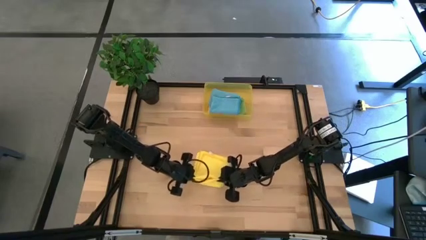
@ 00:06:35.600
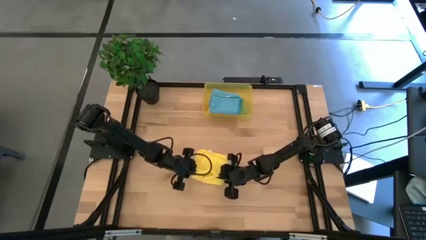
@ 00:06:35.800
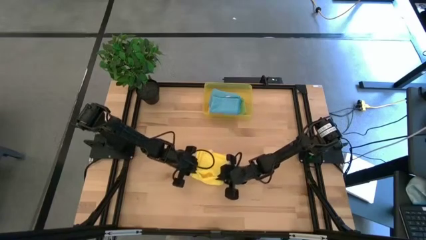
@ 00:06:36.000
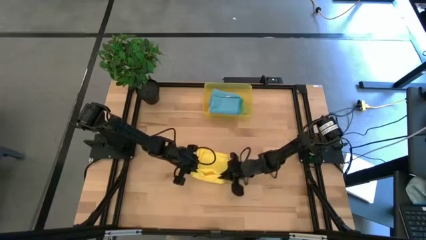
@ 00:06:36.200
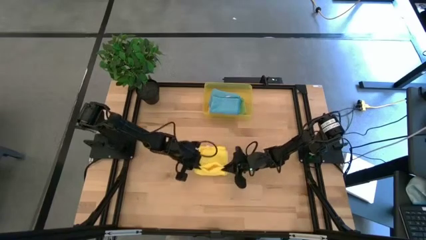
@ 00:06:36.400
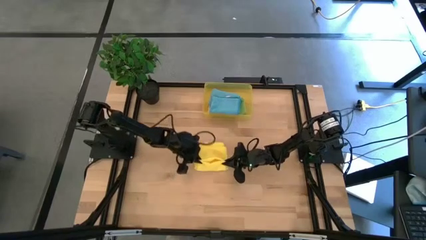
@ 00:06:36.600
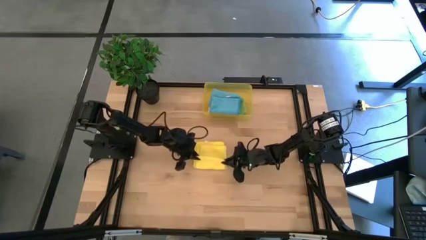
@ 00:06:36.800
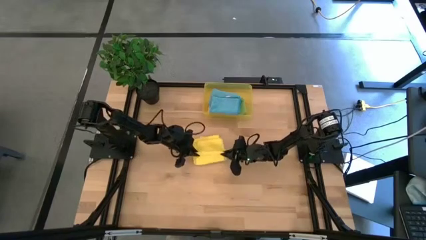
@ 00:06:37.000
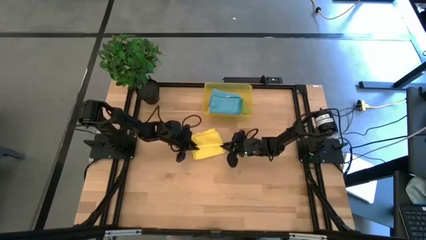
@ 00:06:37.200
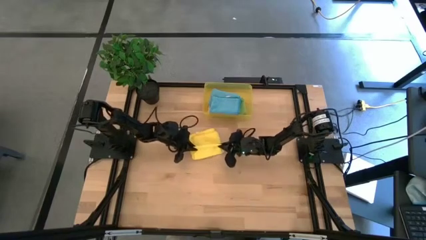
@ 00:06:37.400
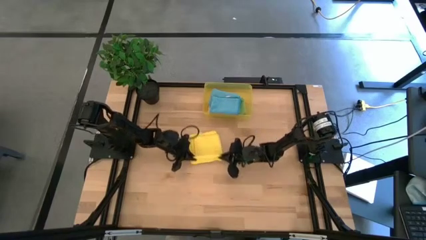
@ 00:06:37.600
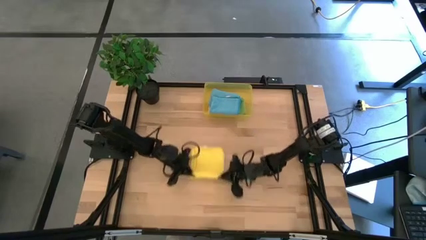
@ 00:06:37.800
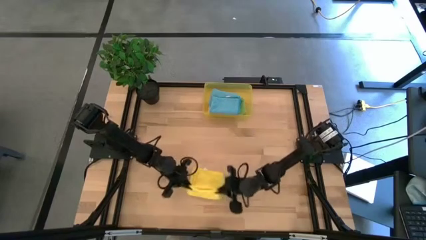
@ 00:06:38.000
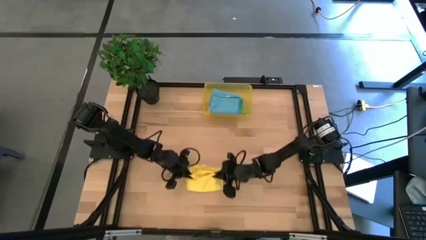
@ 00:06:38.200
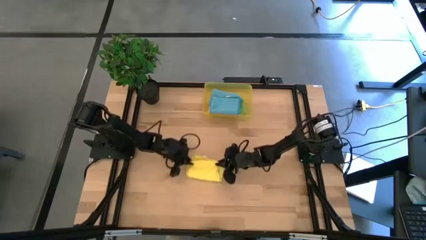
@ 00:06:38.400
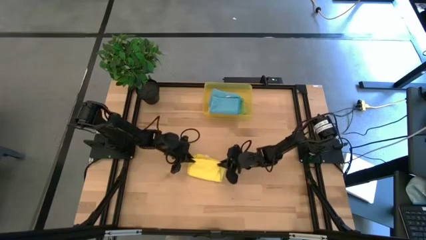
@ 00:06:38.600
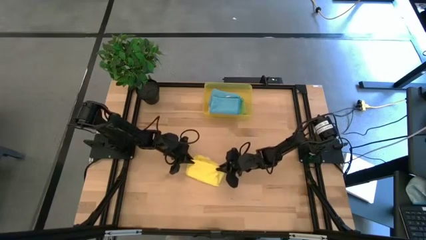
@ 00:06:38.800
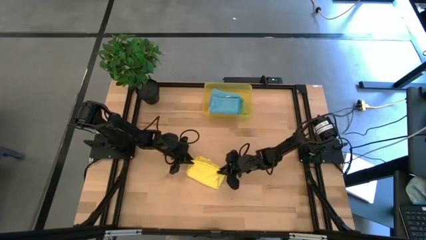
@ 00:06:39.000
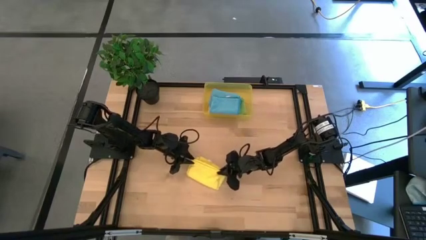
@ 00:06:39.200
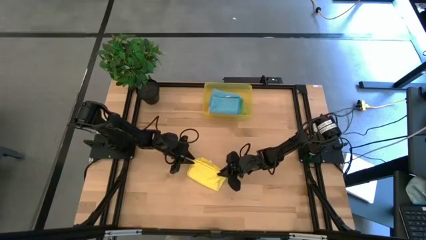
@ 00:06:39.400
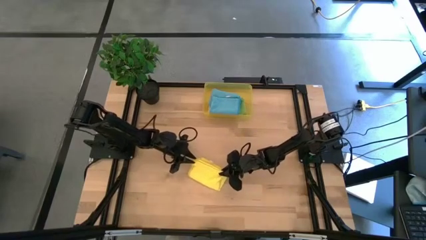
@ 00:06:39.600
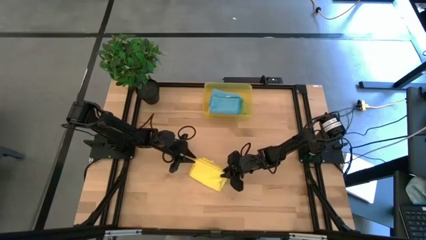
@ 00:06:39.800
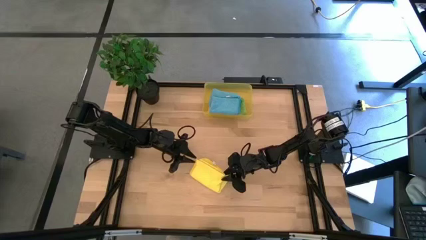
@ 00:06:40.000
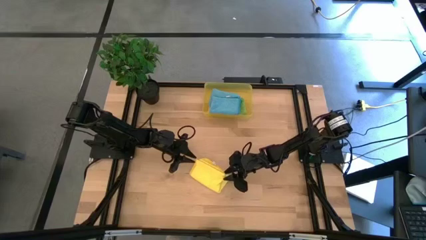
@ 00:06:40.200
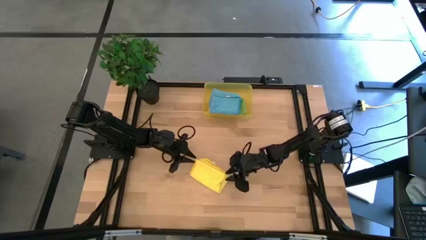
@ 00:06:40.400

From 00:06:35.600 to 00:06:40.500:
Task: Fold microfiber towels
Fold the yellow microfiber cloth

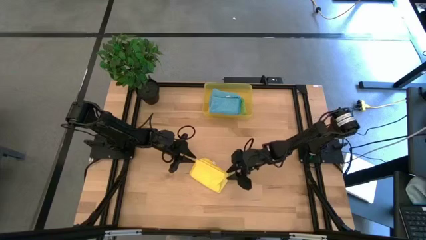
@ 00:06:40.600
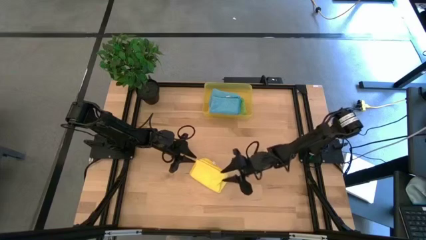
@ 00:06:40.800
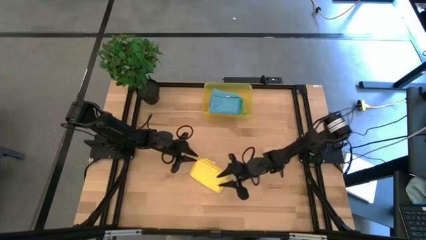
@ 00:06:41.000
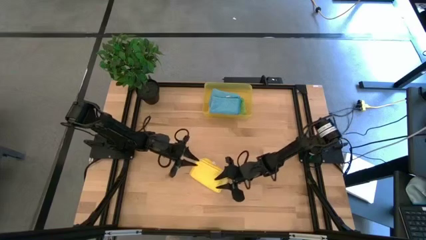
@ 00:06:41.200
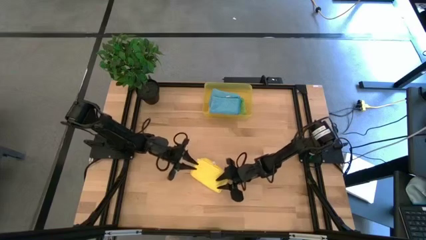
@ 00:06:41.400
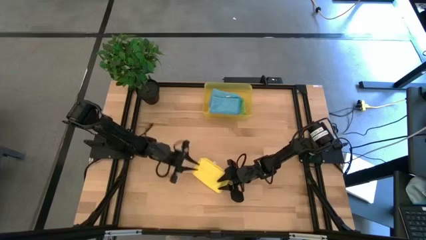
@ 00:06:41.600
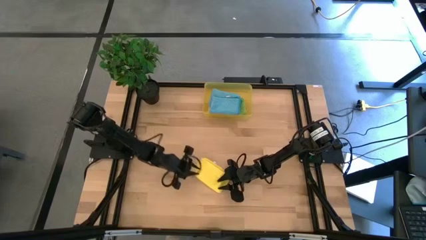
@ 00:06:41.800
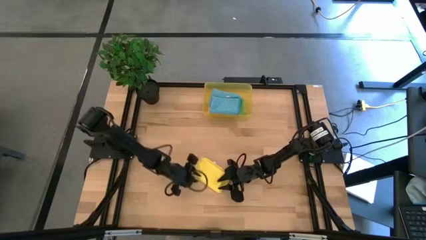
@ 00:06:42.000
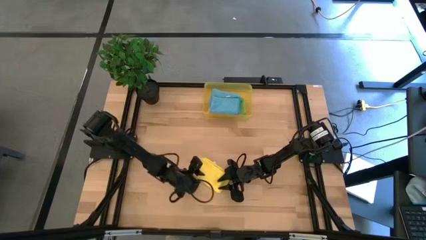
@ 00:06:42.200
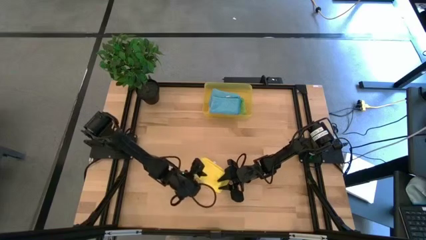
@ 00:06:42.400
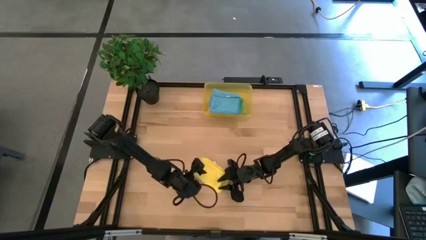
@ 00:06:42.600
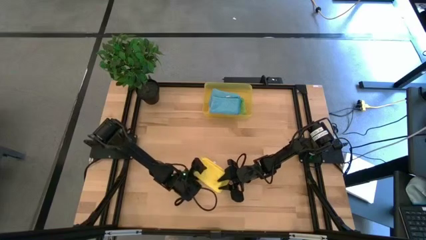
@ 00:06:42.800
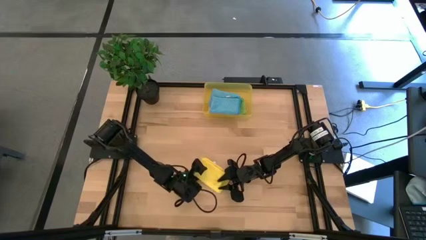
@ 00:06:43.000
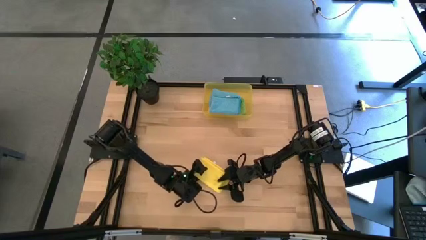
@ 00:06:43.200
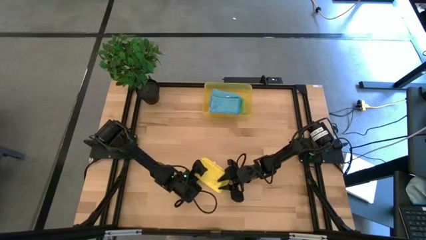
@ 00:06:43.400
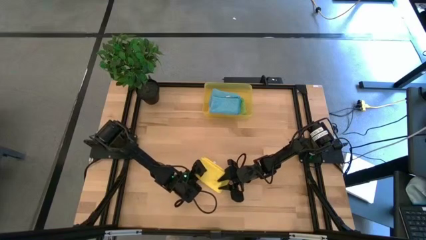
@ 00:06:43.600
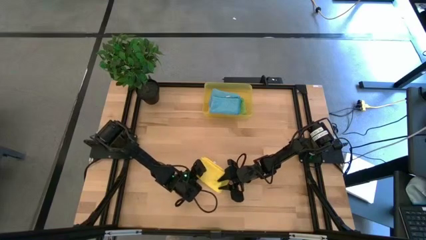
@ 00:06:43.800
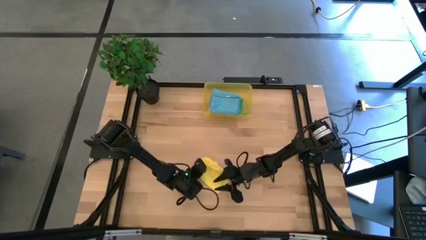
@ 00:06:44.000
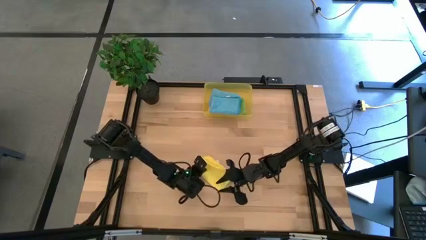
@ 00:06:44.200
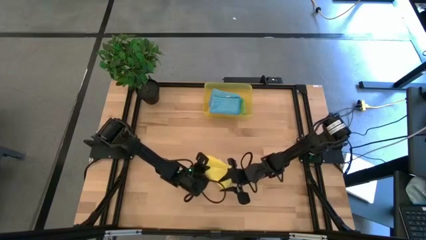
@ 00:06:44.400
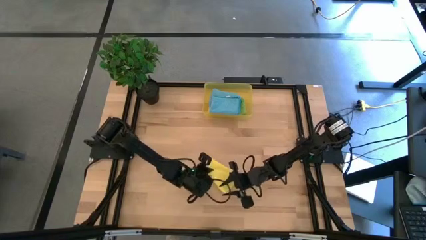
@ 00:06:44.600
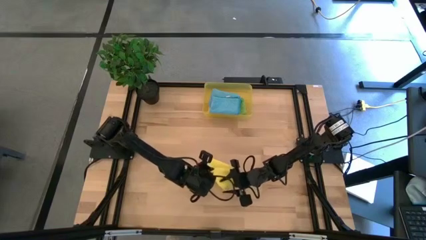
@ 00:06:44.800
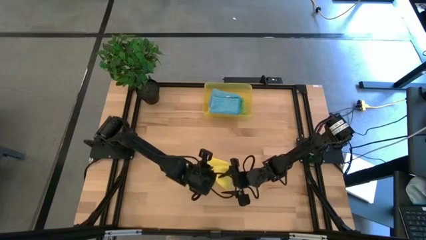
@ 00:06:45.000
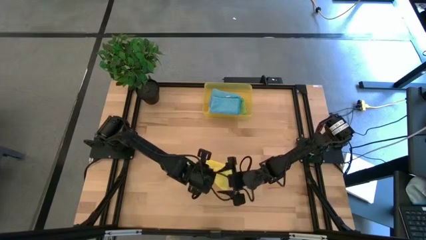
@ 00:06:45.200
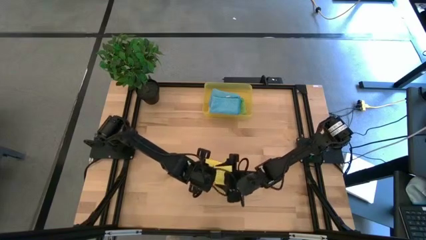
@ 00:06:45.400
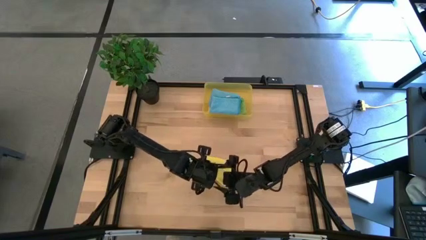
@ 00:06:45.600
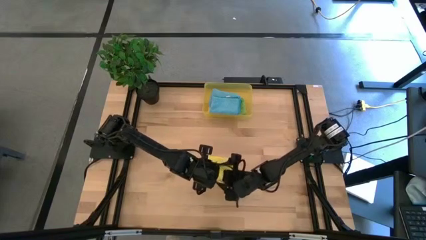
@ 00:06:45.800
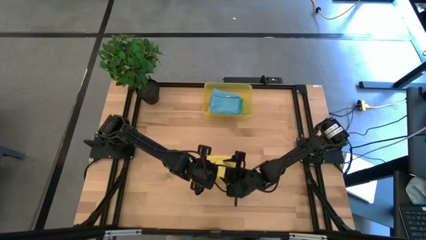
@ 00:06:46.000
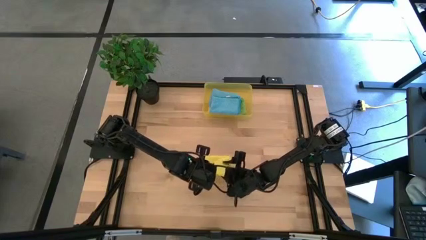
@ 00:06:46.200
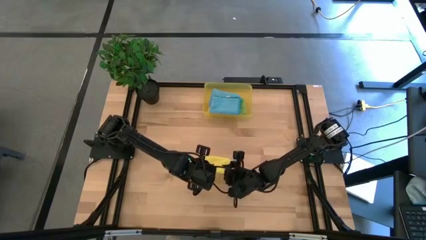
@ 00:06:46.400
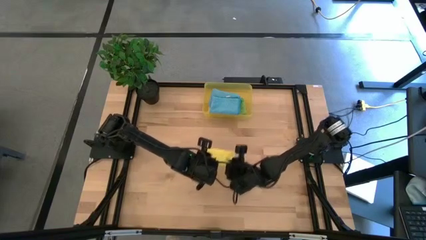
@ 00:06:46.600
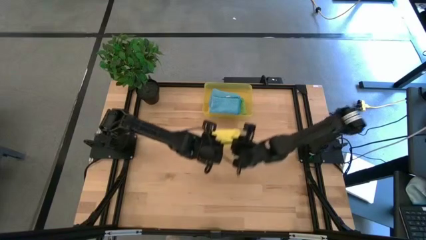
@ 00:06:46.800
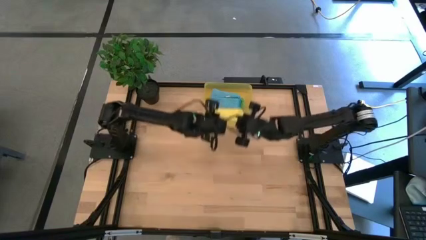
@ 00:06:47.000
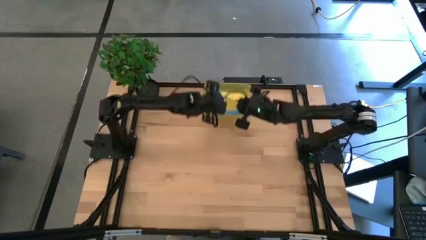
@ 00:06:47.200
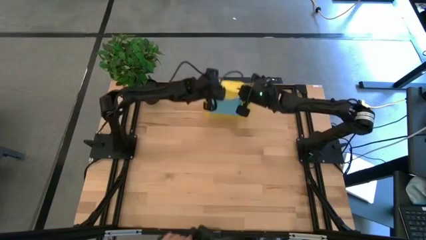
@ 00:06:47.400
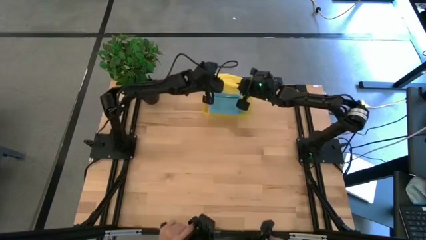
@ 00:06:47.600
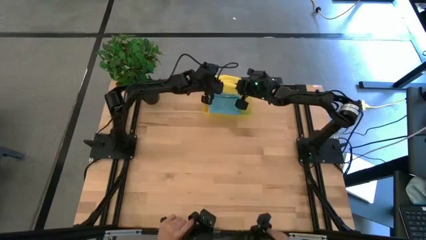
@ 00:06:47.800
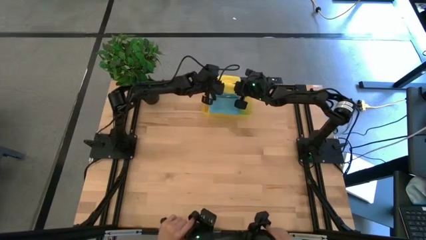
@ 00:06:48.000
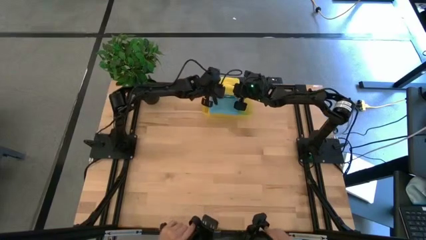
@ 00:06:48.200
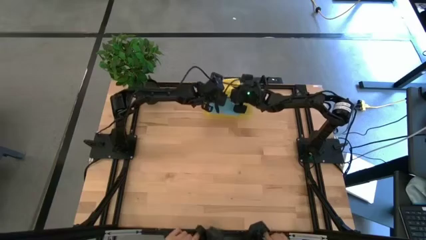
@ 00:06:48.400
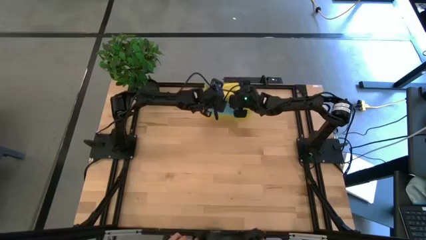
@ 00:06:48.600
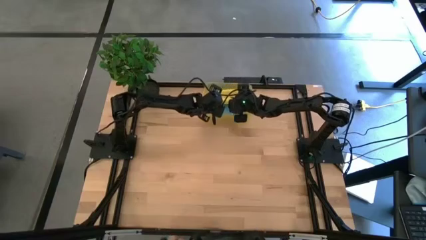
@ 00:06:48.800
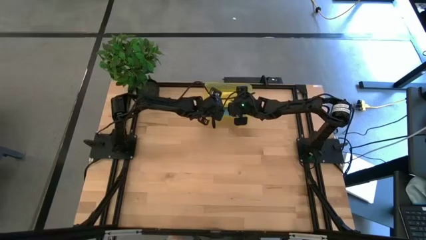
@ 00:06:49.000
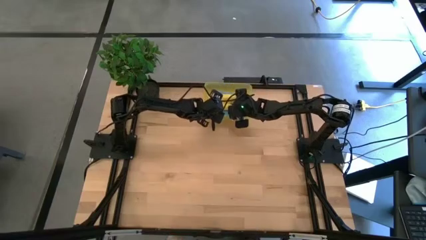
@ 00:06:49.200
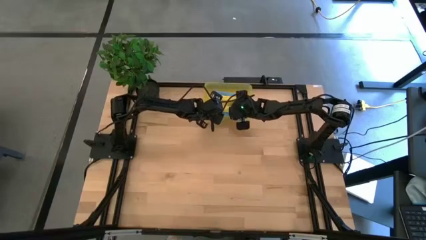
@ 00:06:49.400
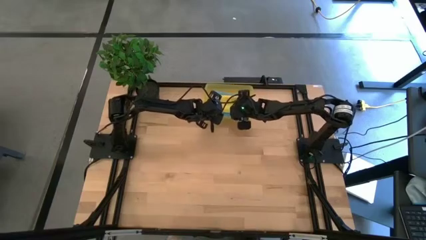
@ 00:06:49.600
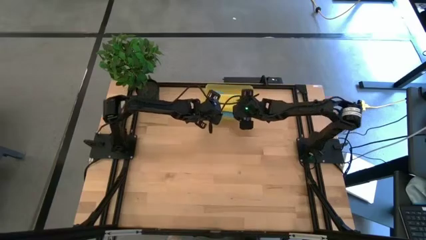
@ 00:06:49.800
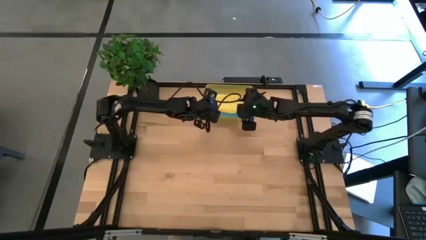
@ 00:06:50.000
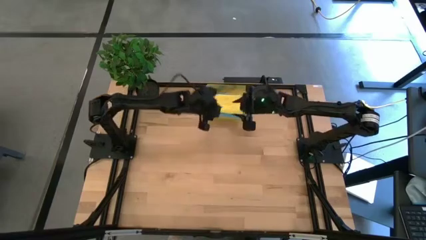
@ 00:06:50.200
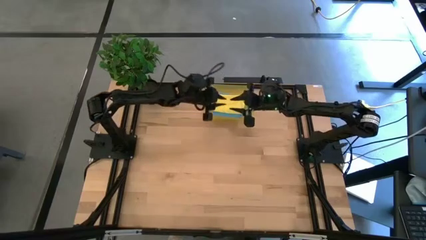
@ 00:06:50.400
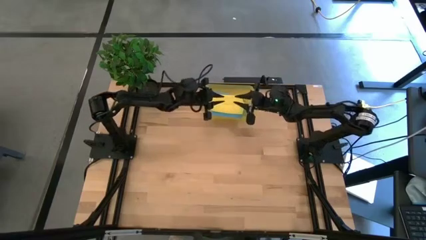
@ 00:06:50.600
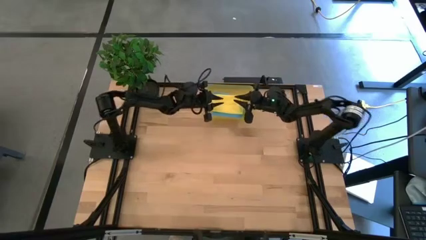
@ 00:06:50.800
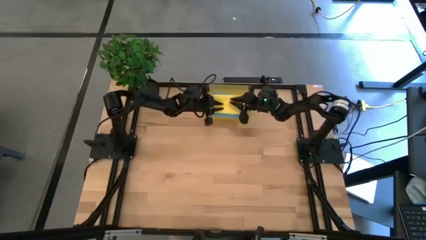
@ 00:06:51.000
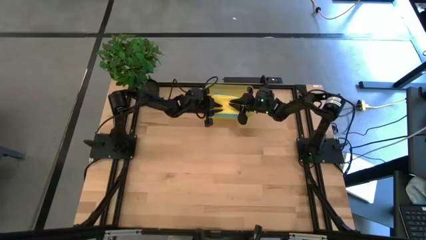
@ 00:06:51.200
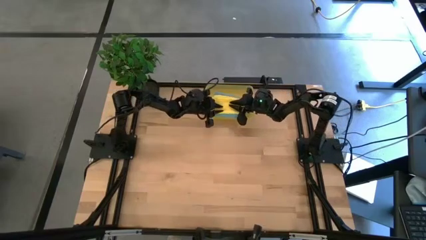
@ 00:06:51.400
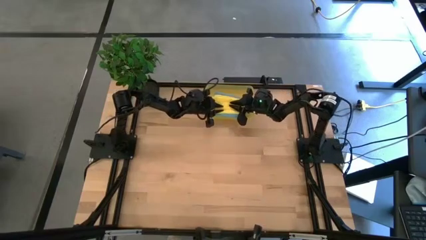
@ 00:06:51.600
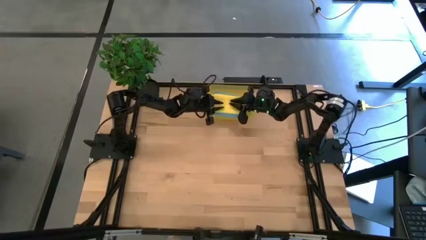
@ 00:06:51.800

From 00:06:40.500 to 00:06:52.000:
Stack the folded yellow microfiber cloth on top of the blue microfiber cloth
